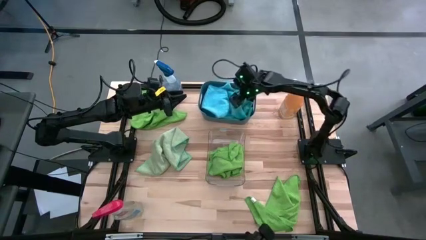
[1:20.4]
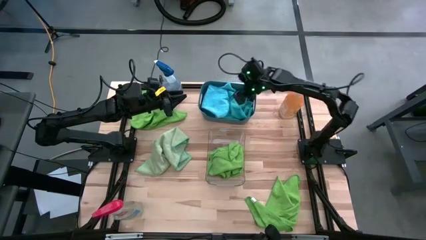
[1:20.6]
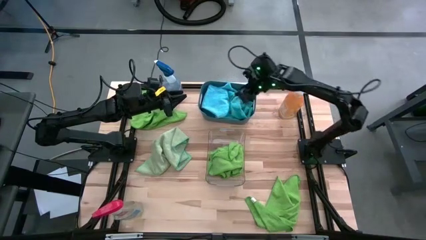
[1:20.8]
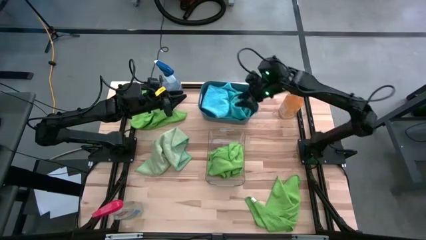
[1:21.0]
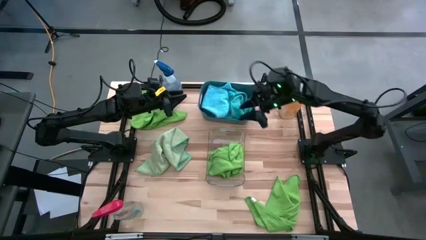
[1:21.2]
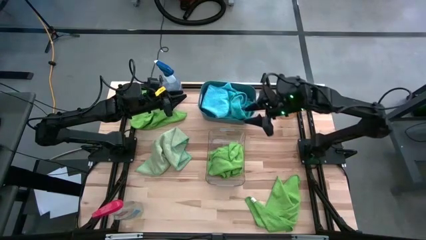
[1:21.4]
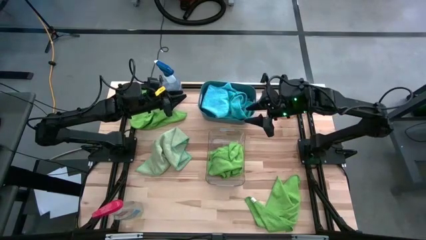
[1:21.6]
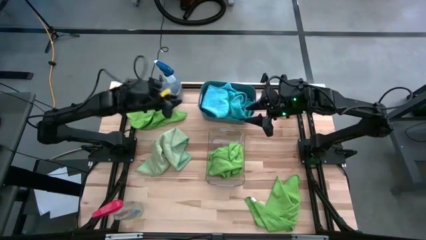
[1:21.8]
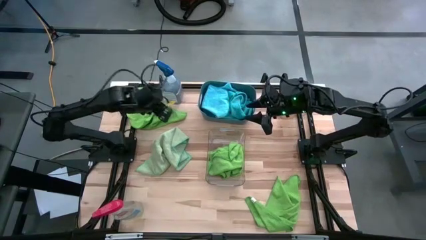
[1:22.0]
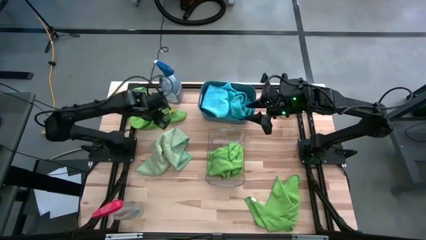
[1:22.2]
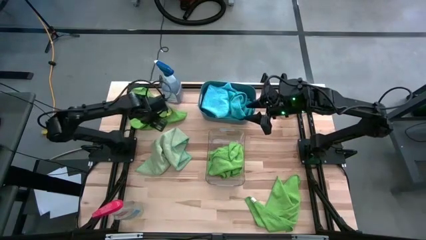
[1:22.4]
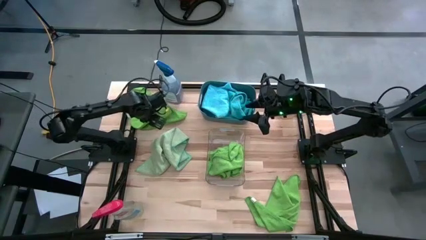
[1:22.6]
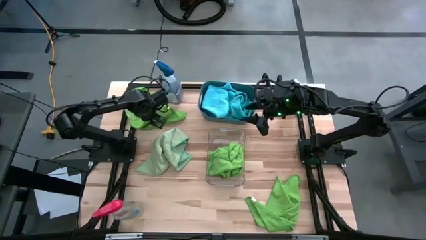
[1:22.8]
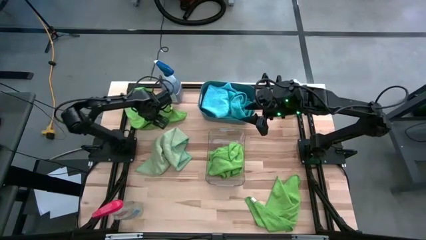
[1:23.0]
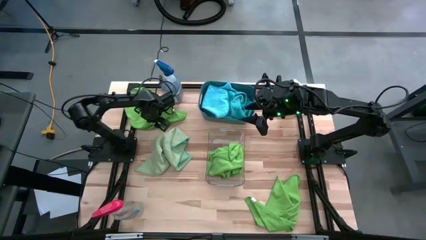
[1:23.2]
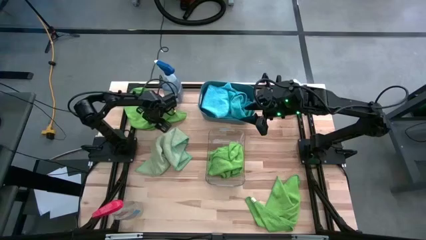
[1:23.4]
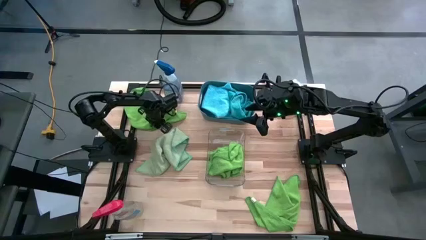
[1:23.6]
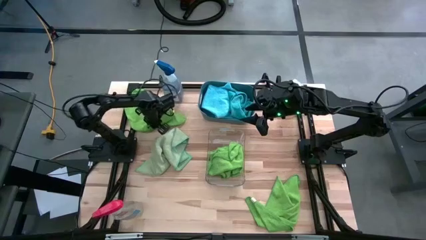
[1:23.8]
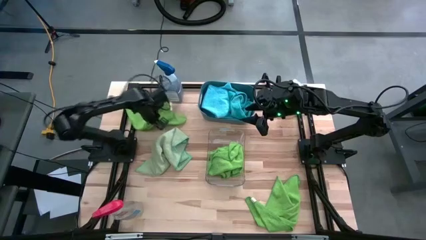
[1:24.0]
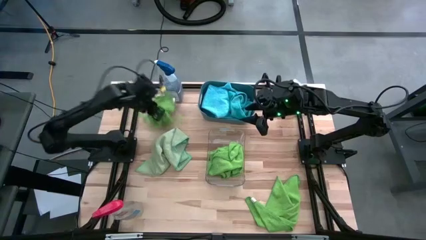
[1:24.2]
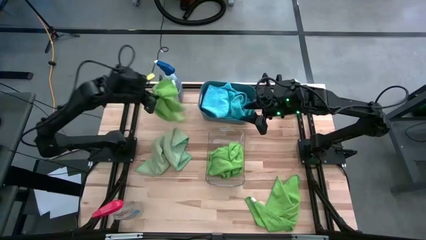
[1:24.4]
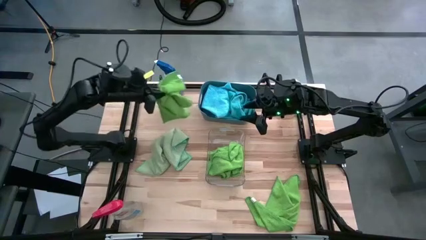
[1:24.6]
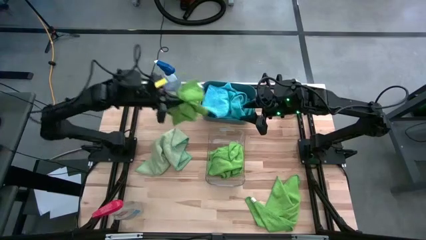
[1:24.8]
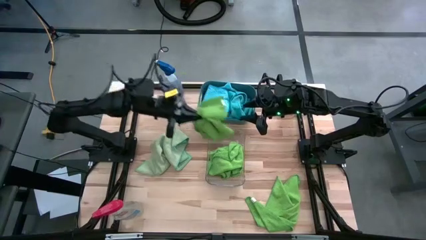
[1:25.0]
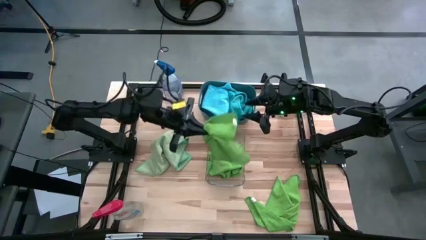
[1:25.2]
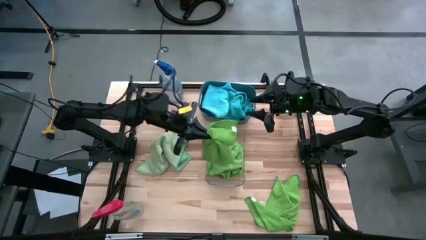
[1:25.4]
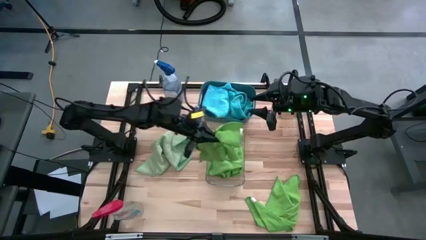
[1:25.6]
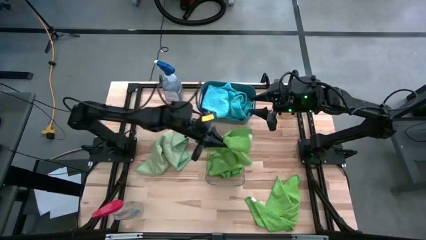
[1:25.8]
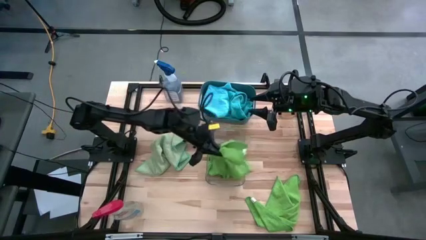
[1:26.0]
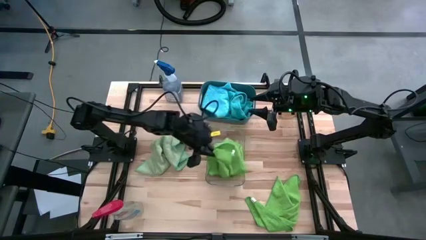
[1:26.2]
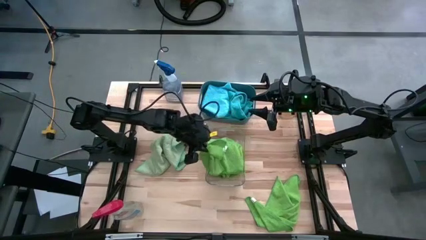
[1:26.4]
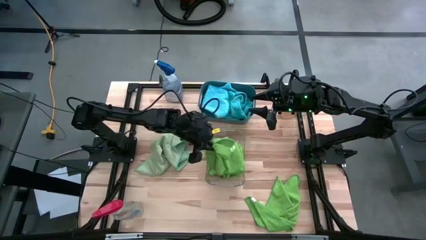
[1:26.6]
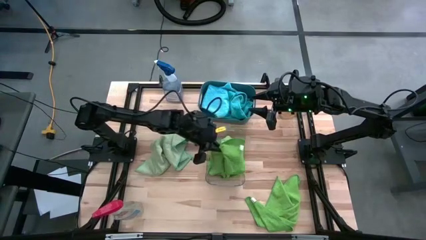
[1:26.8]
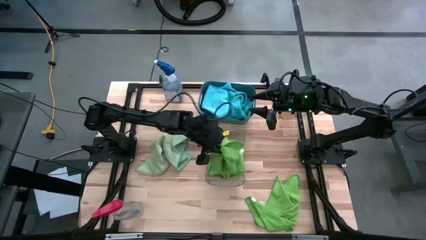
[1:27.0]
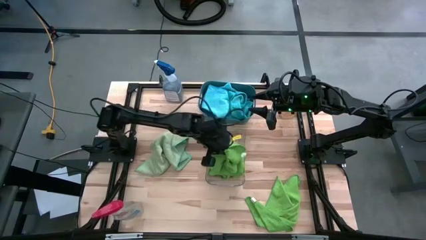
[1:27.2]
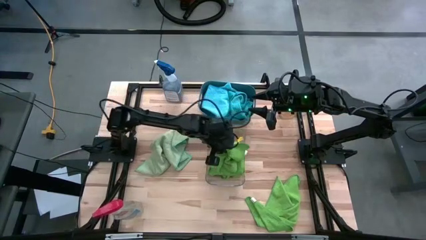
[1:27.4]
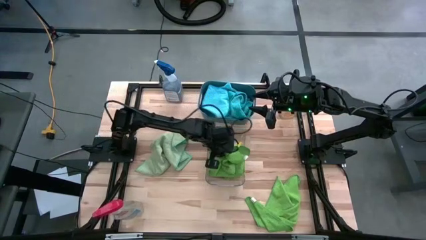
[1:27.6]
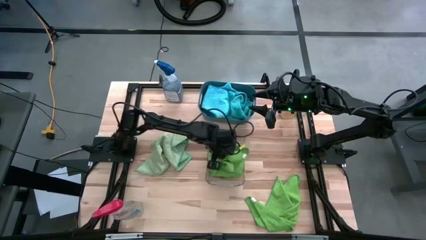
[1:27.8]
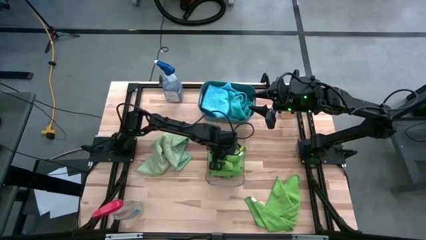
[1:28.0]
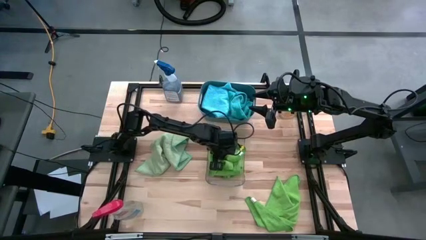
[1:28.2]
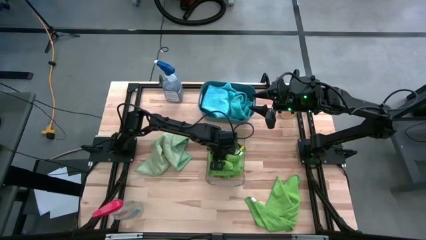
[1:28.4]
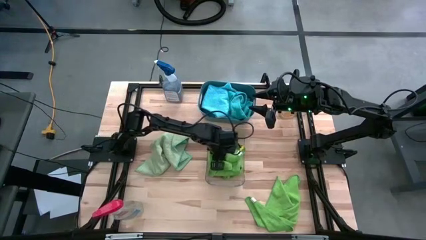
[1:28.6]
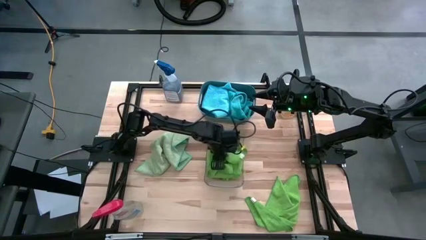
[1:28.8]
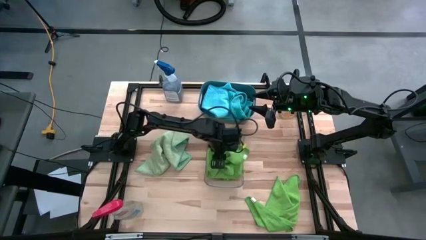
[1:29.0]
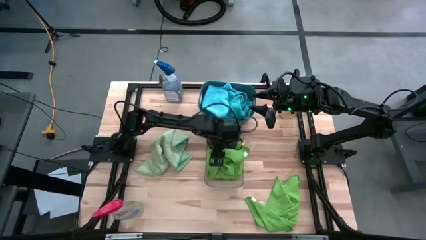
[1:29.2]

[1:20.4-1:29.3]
Task: Sort microfiber towel by color & place in baskets
Put the green microfiber towel into the transparent bin

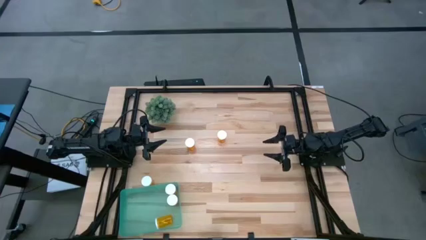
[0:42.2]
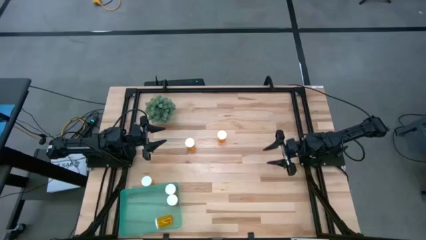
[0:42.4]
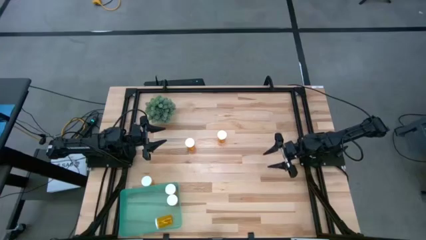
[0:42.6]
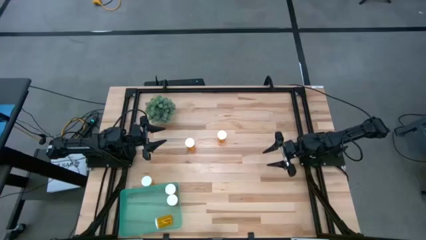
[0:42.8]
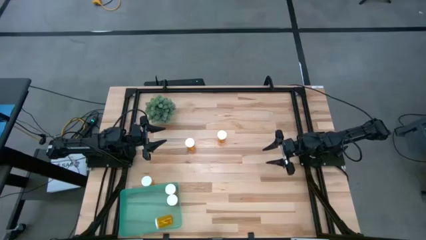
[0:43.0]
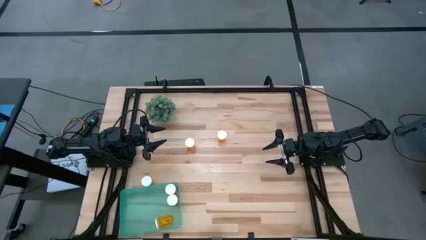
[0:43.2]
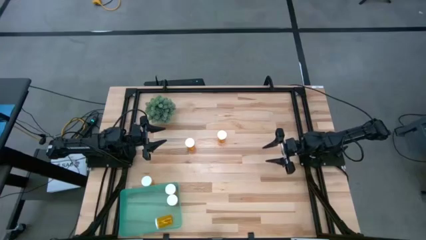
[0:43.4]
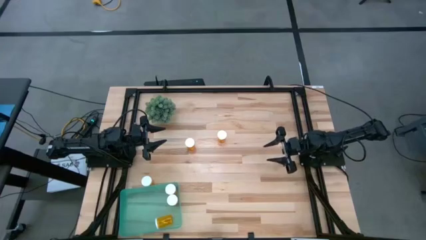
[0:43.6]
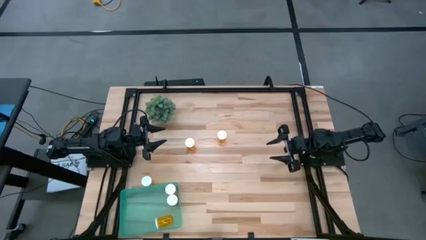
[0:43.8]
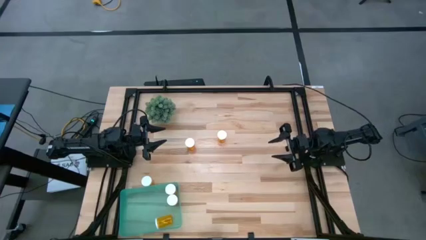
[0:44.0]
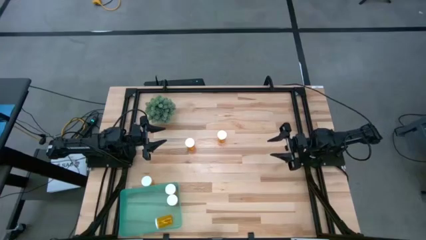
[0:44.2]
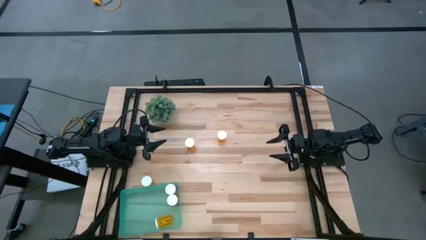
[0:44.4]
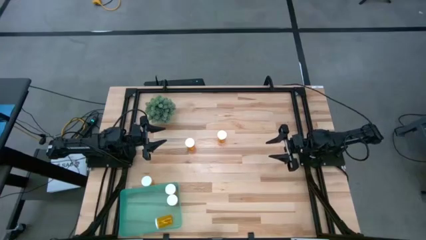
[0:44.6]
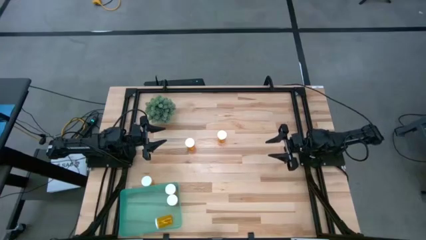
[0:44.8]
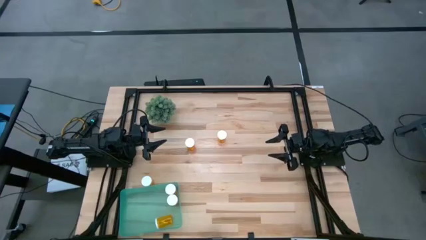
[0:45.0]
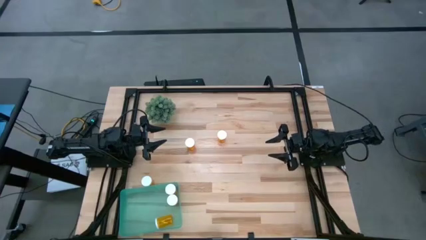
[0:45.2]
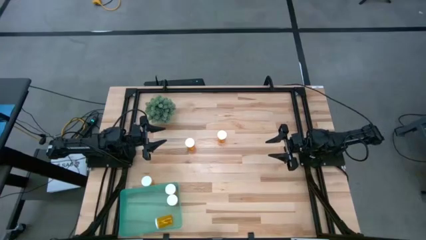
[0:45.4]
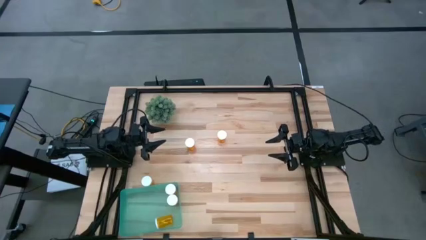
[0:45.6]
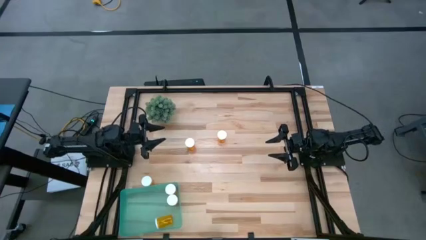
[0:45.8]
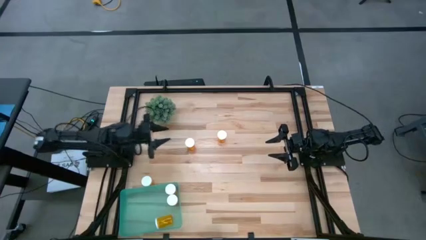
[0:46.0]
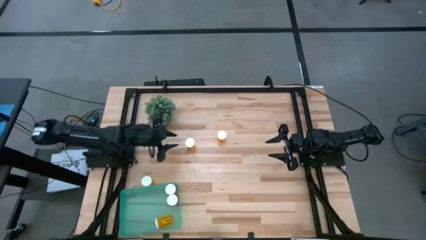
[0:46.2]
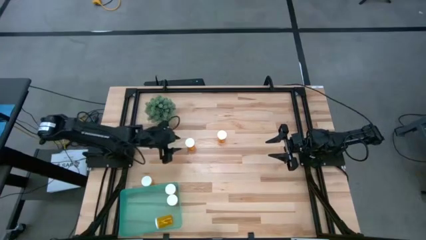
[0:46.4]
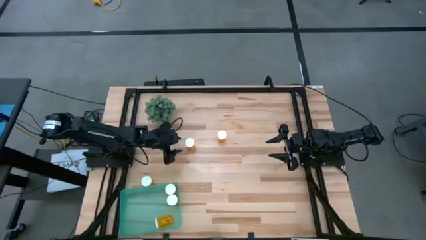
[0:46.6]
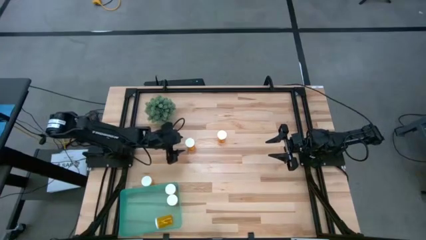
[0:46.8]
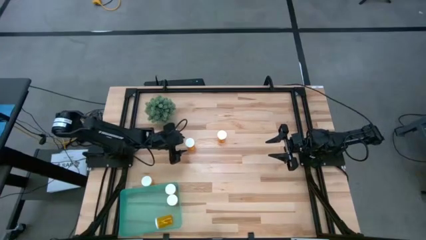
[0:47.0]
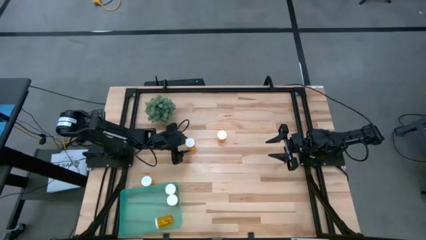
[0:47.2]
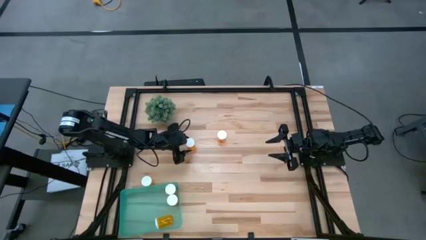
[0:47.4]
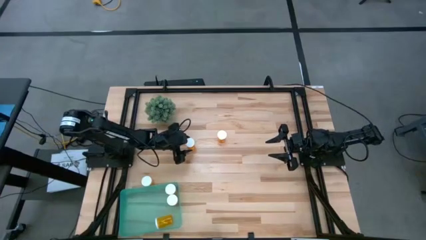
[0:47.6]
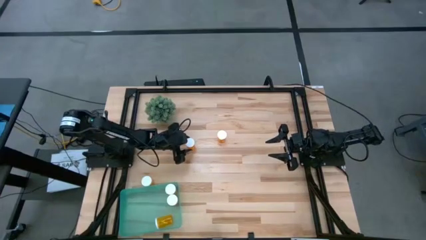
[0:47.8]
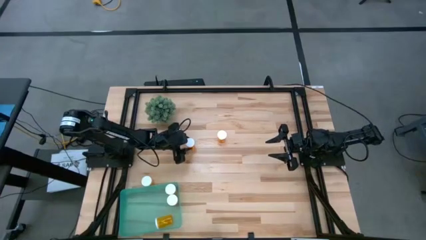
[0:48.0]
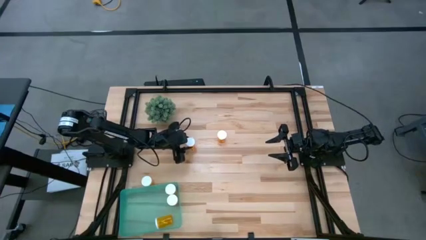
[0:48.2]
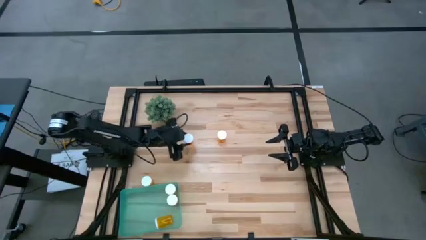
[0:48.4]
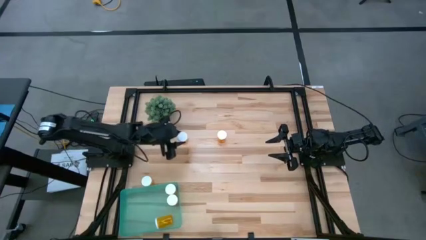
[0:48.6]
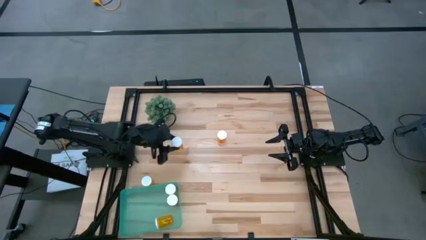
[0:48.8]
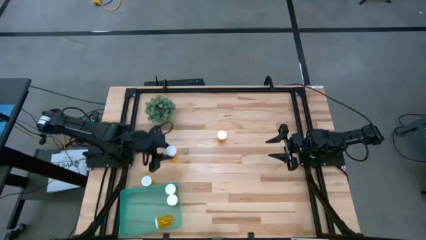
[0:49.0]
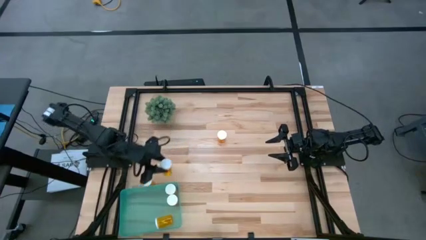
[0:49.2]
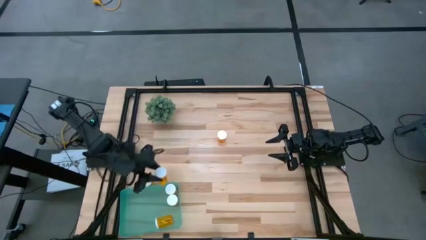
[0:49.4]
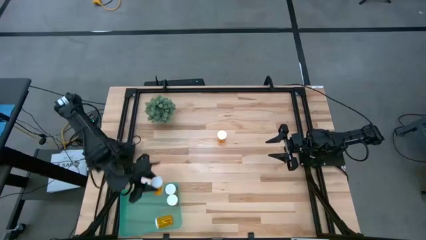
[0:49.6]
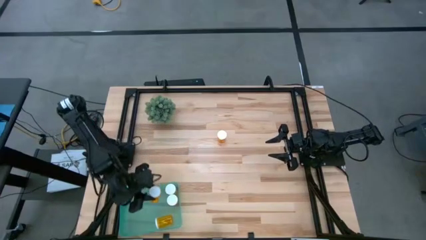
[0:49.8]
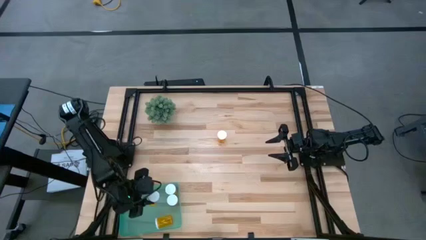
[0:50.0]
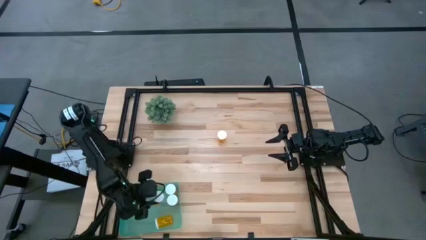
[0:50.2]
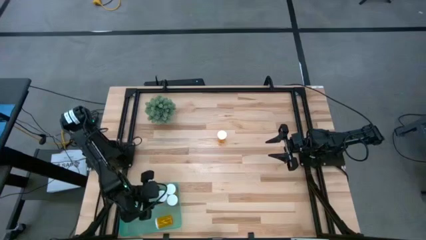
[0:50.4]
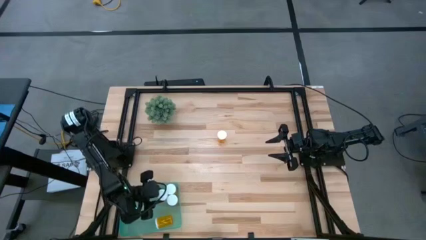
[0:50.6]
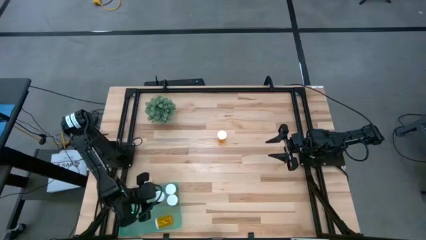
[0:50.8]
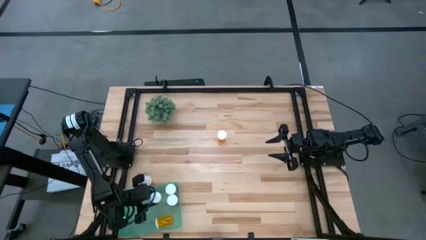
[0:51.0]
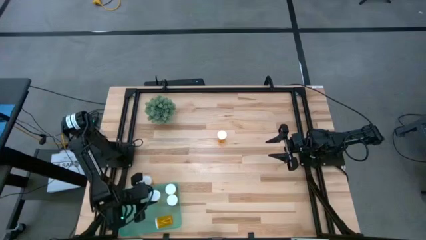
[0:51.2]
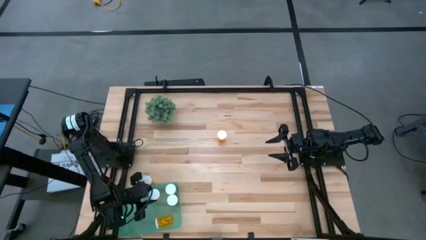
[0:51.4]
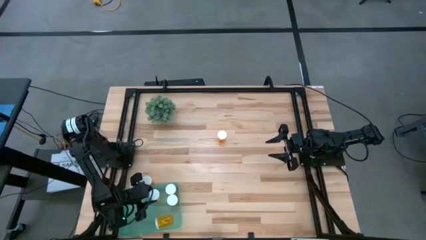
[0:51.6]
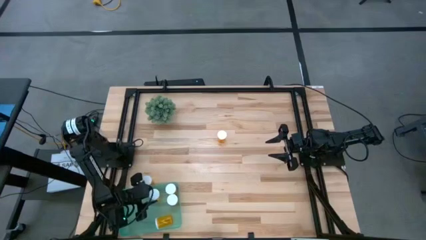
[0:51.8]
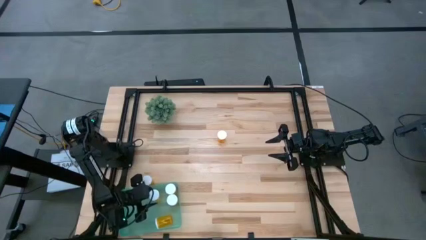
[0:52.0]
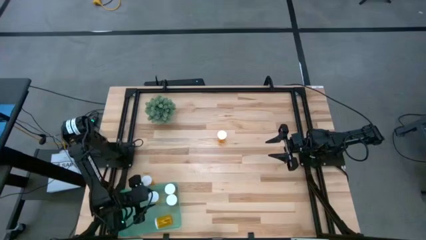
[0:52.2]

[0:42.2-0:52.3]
Task: Pick and place pill bottles into a basket
Put the middle yellow pill bottle into the green bin
